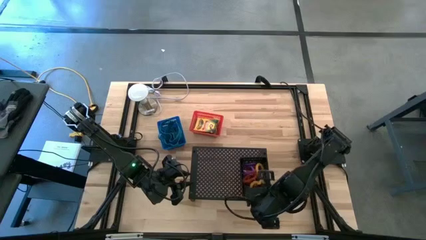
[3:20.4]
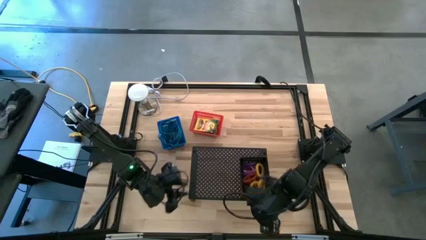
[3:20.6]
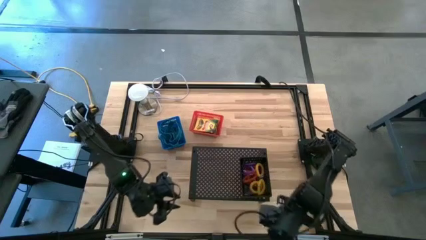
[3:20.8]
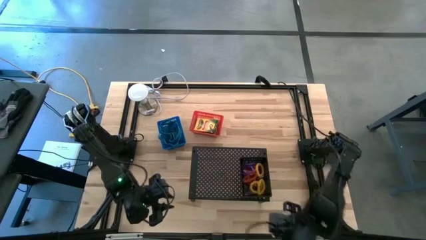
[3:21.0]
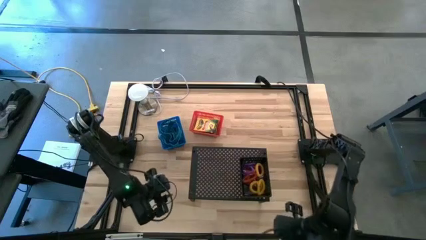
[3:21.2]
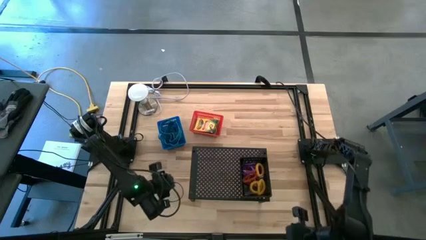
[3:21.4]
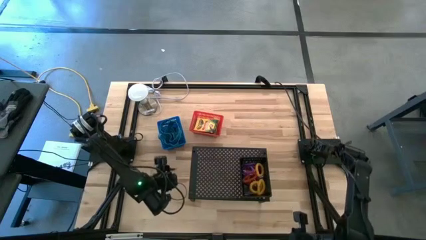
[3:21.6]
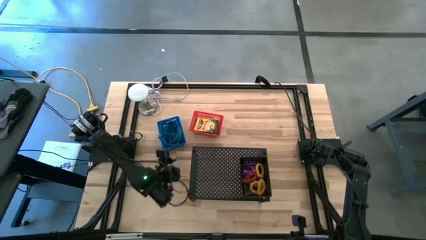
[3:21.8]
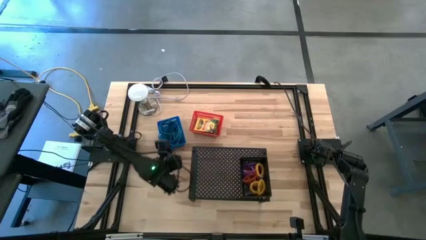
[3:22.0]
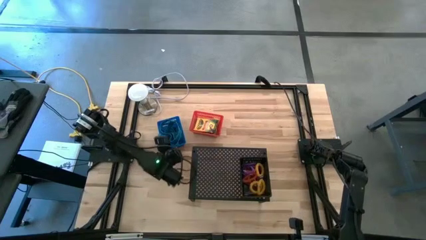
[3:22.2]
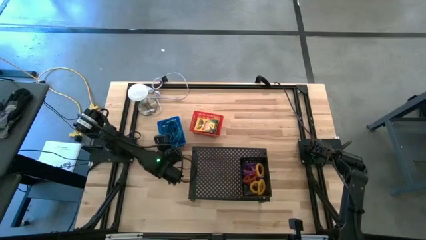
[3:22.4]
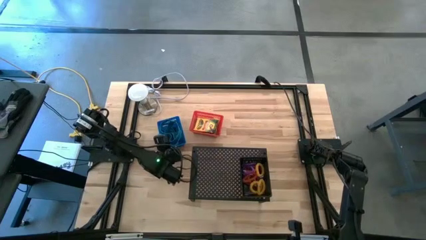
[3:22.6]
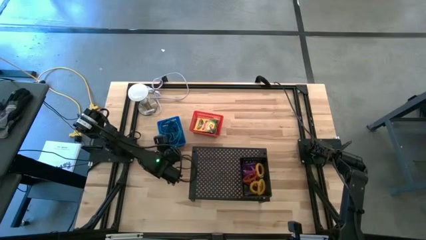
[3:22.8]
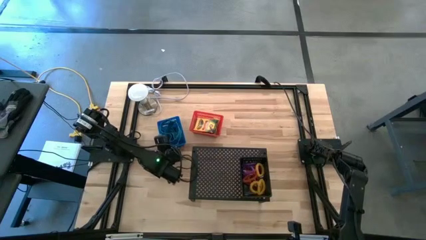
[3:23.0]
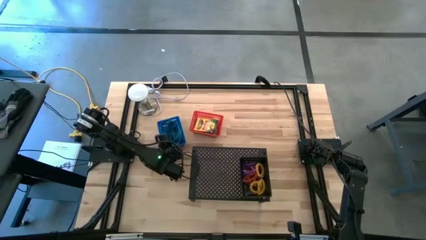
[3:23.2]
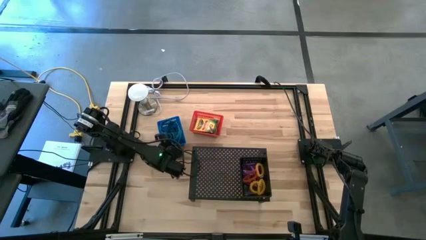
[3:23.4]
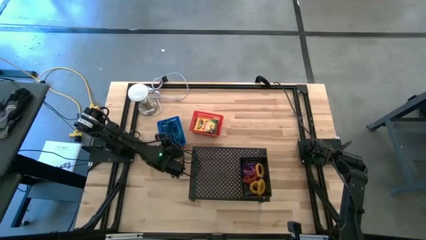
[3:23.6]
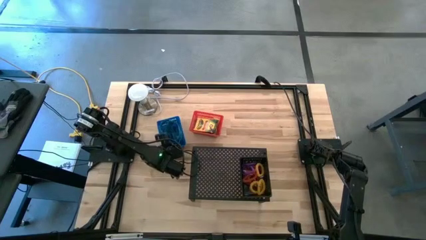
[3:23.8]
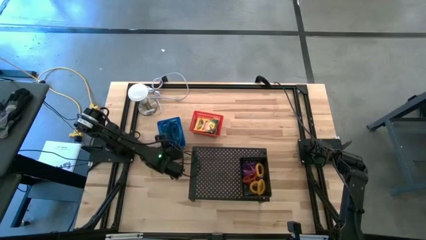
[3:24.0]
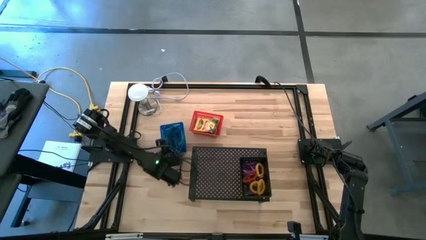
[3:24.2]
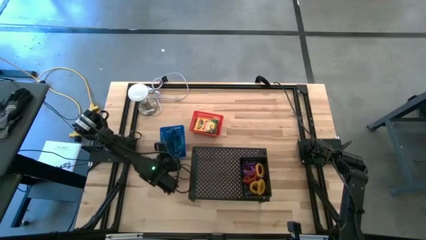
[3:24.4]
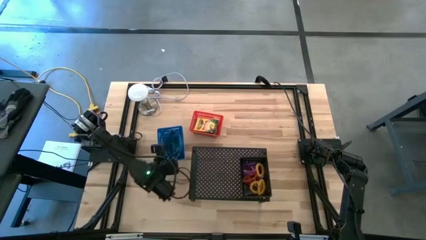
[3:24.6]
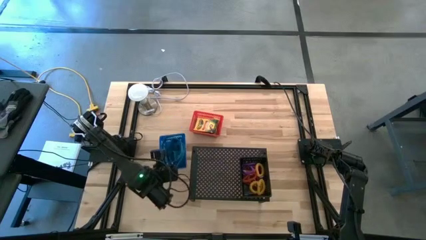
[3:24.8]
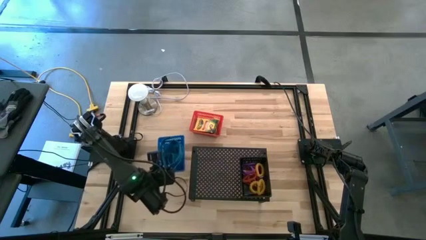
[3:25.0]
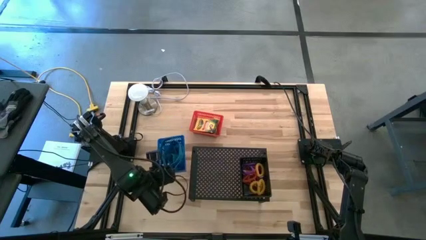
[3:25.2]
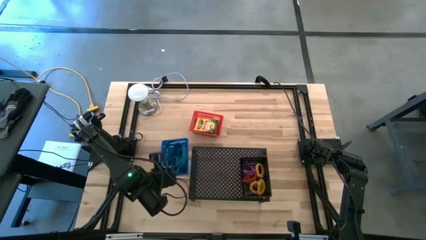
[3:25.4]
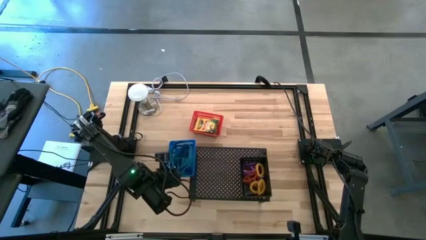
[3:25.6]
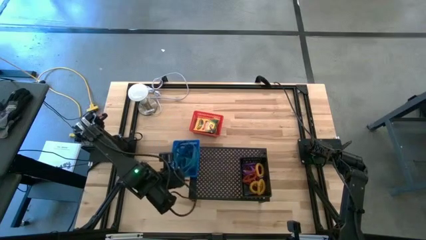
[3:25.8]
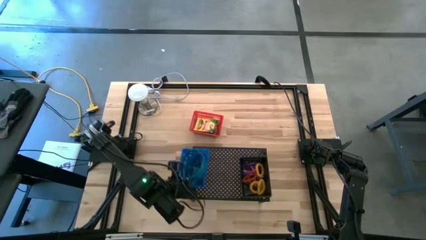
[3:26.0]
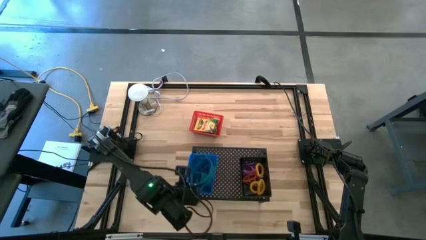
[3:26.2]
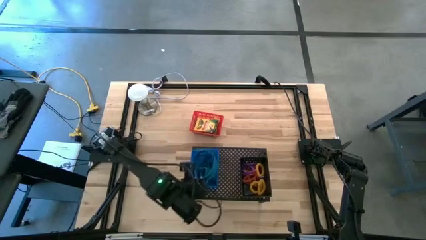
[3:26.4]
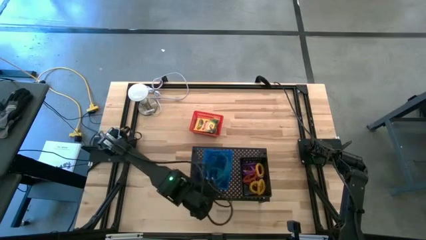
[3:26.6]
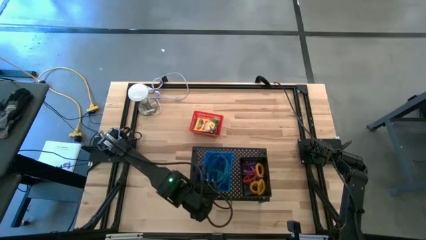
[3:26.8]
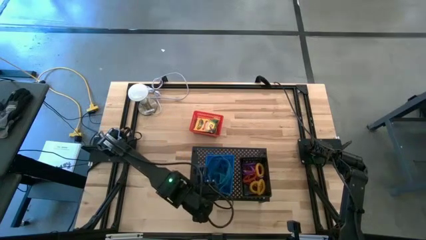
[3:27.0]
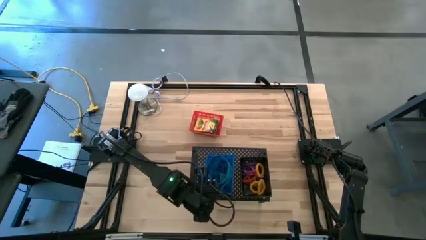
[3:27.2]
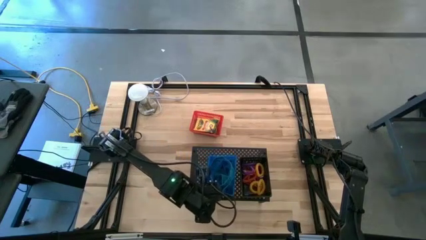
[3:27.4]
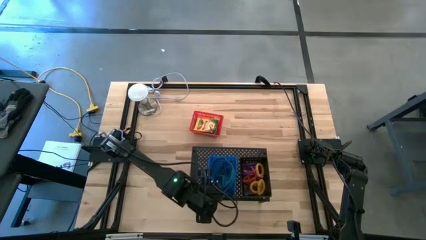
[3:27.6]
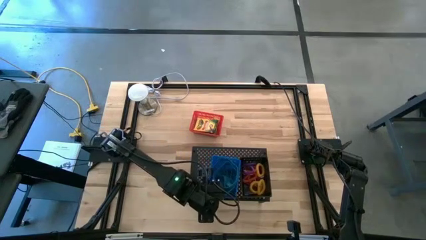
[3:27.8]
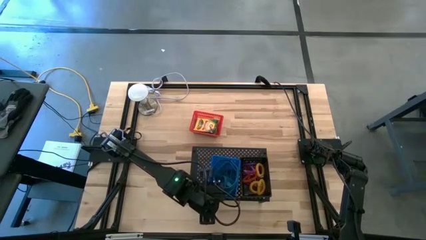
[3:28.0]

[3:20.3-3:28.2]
Task: Pick & Place Office Desk Supplies
Put the blue bin with the rubber bands on the shelf

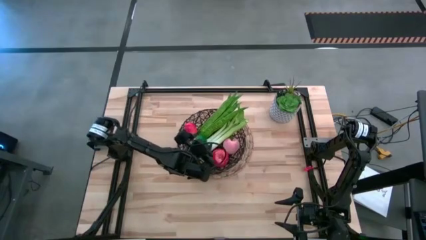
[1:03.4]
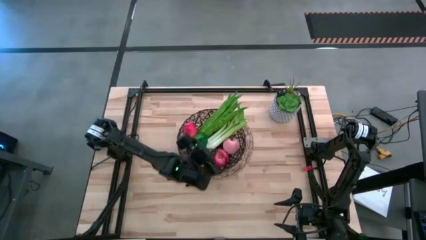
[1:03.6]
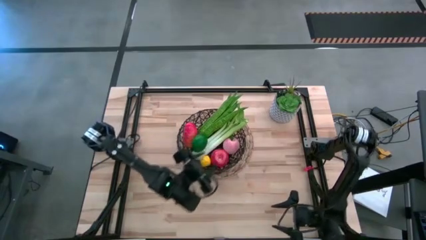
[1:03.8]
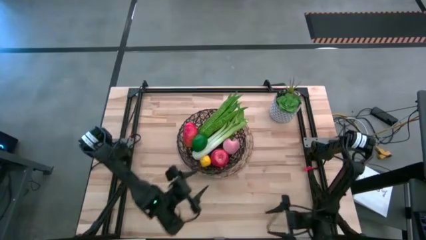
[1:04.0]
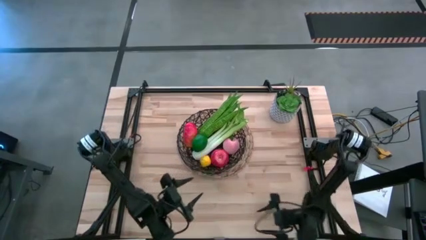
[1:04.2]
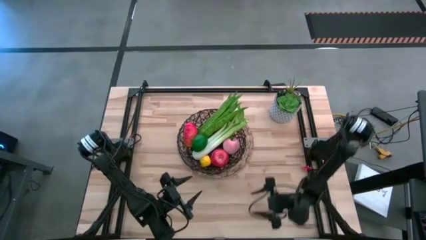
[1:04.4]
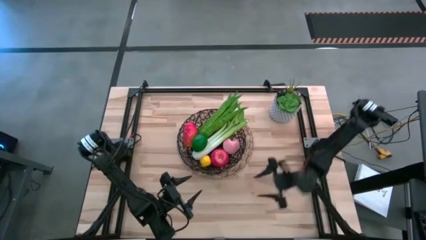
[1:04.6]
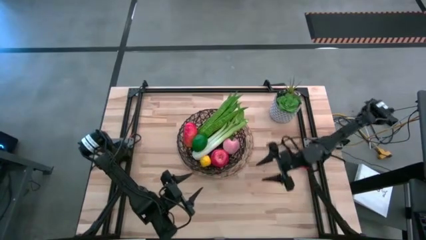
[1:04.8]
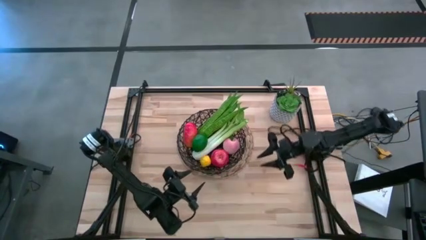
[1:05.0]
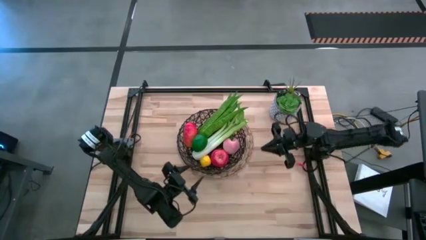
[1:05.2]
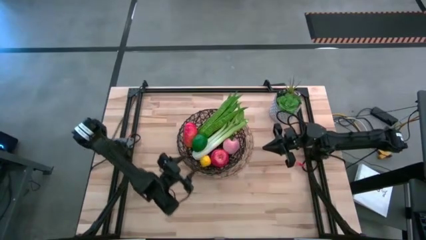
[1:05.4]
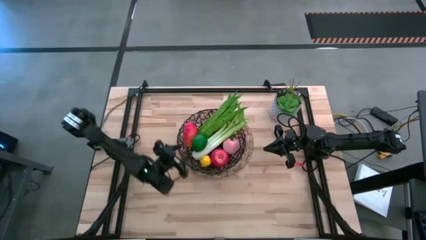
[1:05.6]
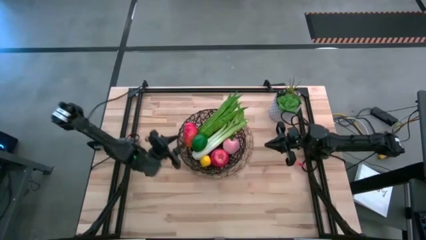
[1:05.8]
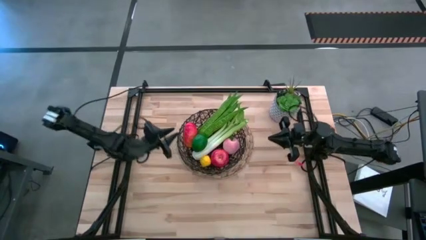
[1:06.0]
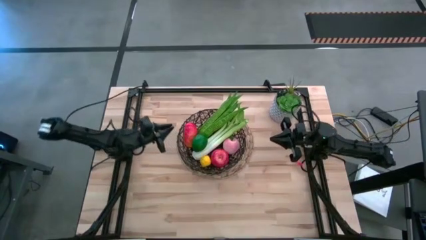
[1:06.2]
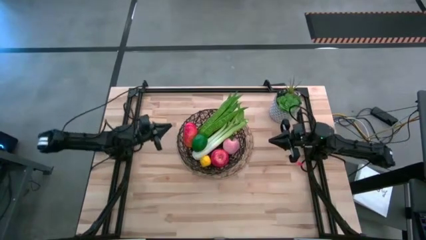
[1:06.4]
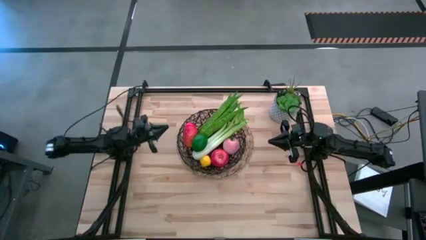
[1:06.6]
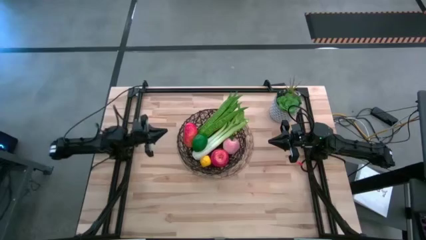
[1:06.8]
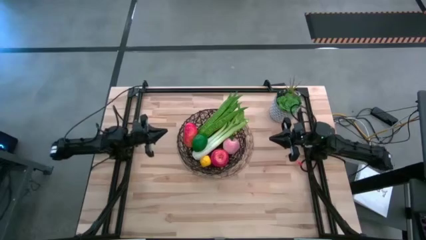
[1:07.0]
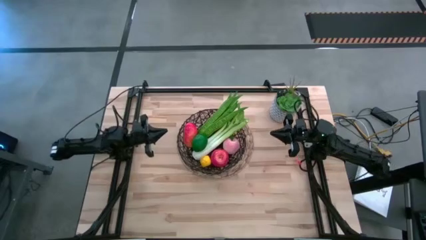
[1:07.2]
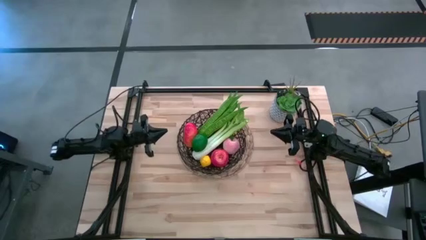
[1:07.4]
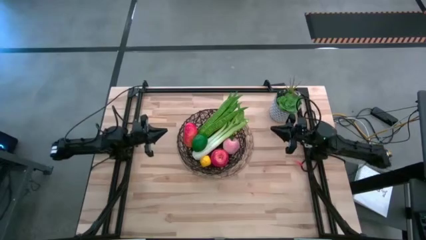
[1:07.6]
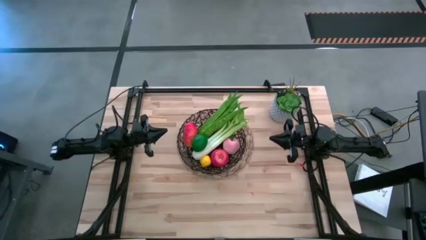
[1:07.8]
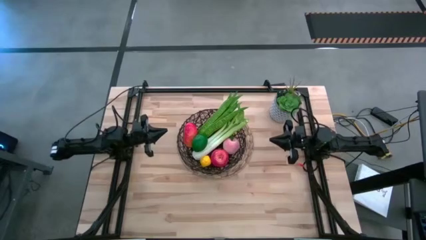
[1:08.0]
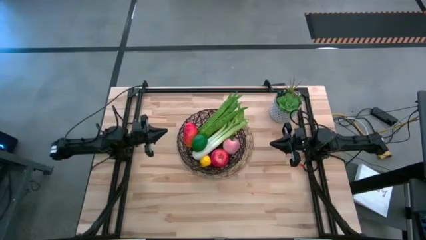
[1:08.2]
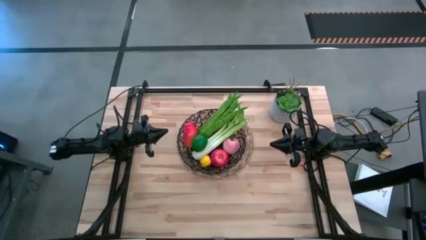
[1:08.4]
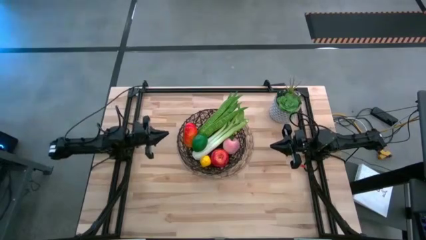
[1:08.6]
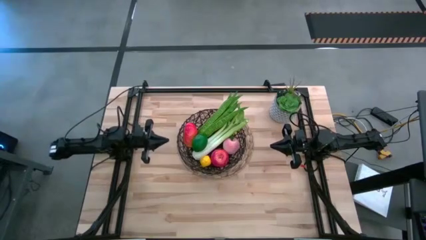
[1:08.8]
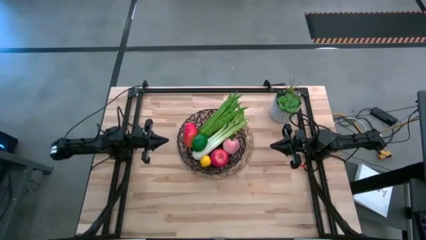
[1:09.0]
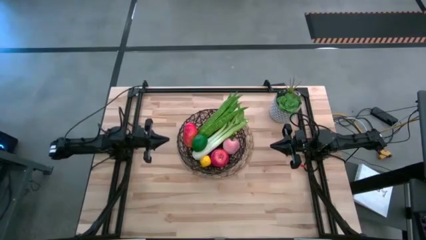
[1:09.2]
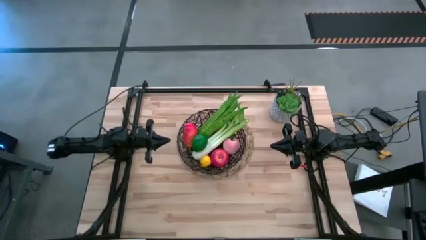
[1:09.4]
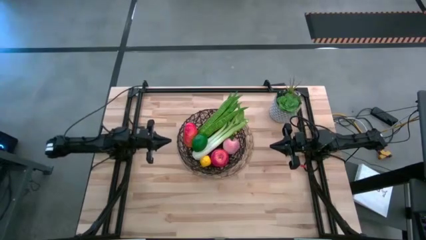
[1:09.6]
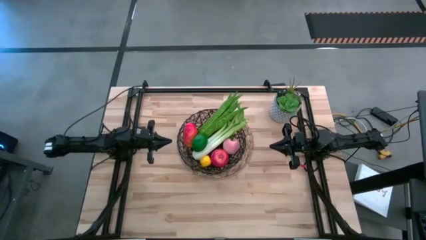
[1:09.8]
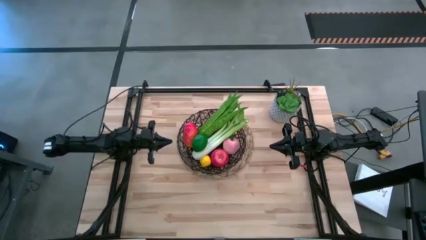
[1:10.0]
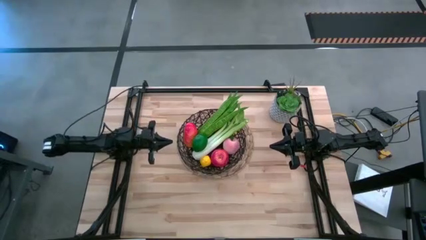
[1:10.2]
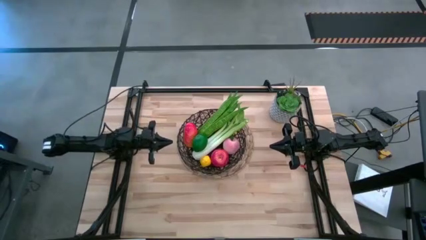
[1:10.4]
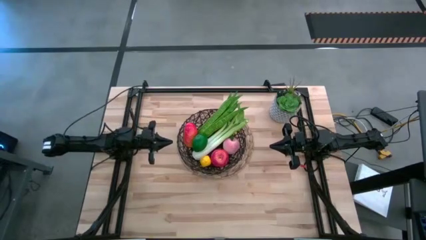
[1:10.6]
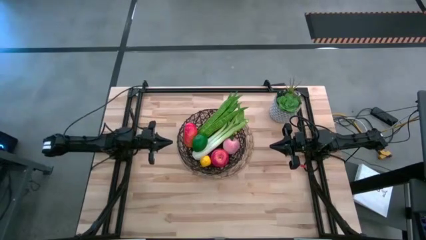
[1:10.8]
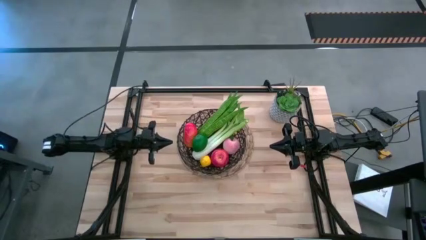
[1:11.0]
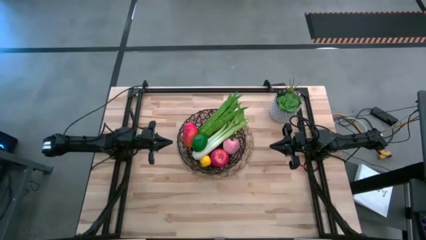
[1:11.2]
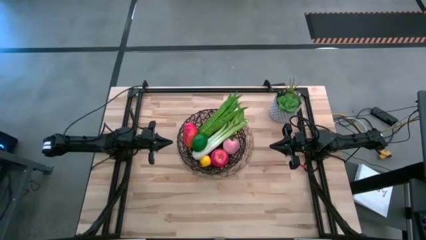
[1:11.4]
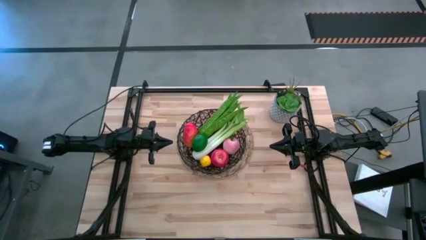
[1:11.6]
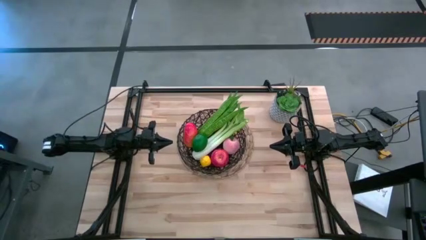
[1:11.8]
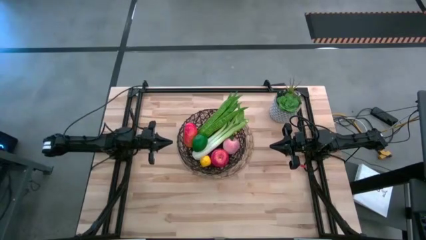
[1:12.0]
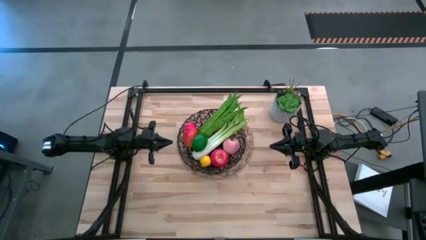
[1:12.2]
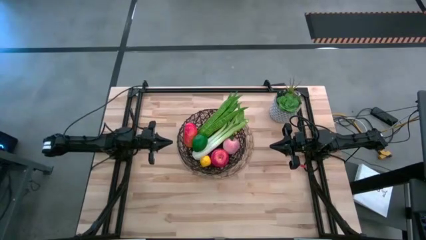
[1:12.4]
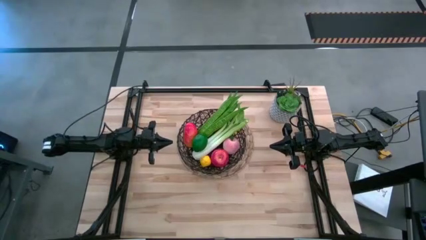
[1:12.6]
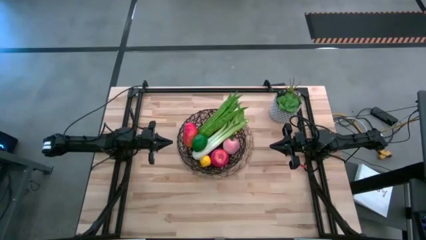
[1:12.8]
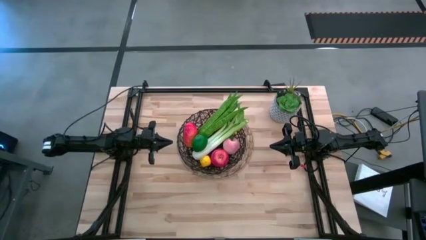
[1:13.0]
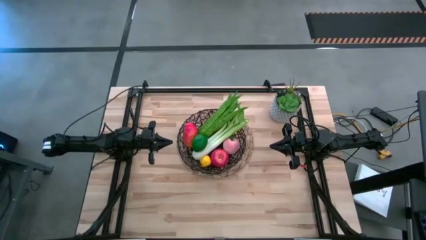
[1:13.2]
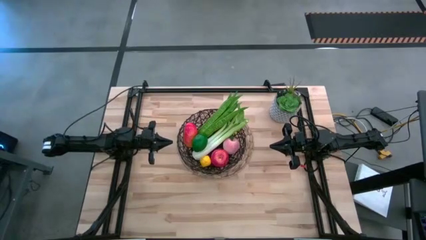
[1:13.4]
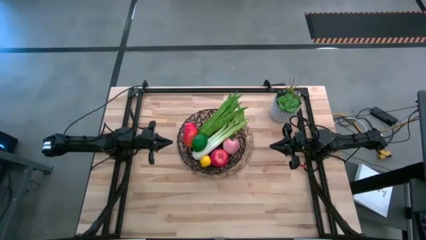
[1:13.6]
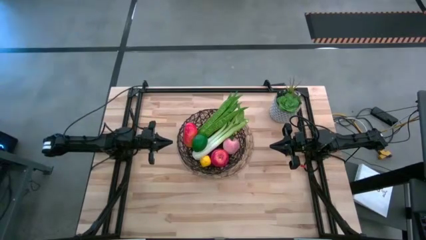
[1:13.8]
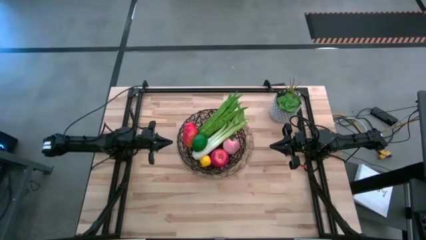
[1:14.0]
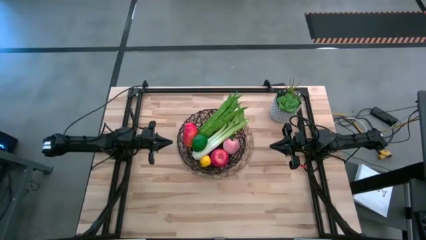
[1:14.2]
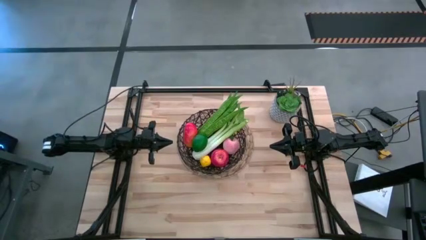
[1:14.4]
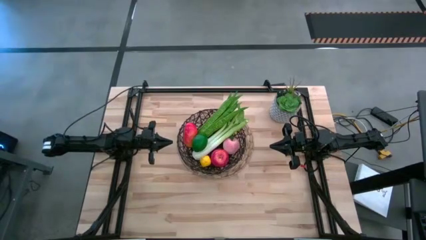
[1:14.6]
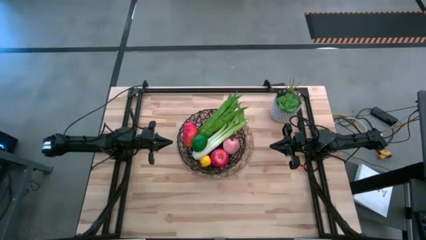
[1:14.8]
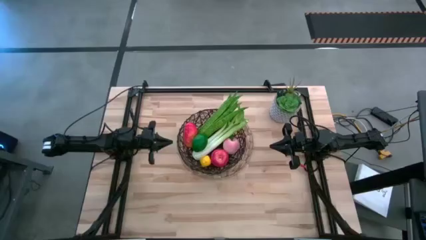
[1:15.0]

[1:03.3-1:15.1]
Task: Build produce basket
Return to Home Position
